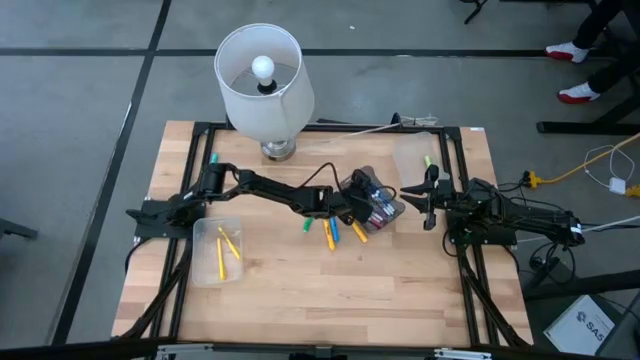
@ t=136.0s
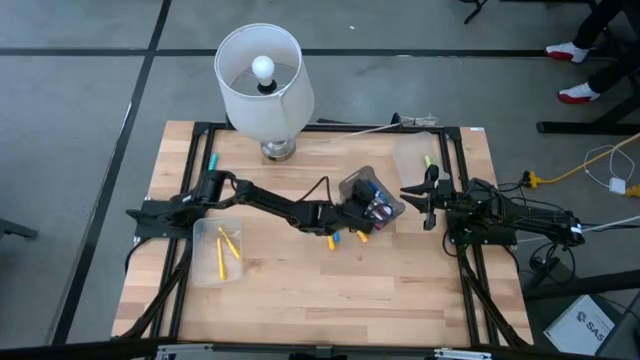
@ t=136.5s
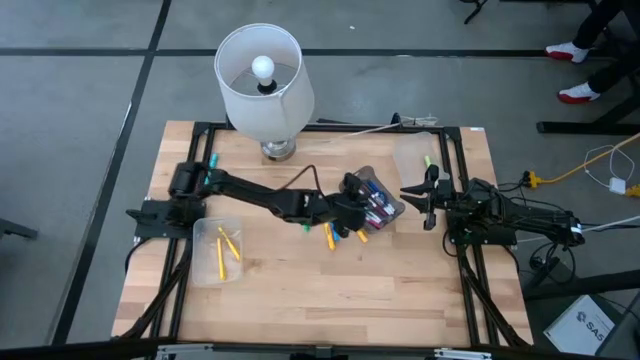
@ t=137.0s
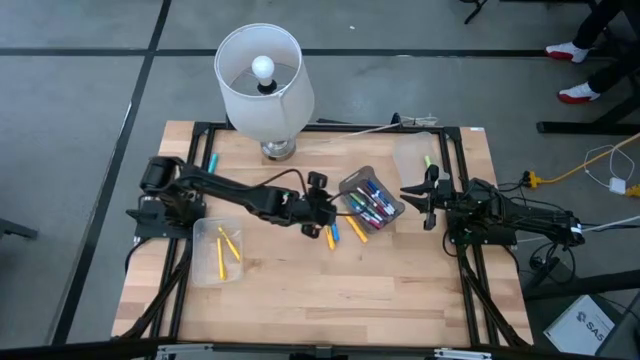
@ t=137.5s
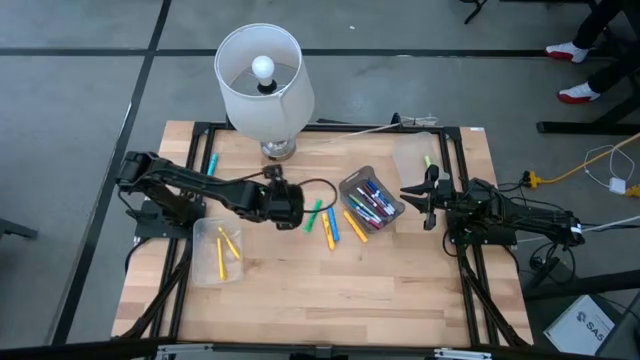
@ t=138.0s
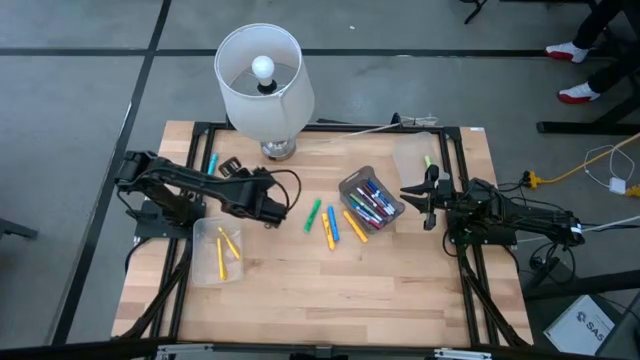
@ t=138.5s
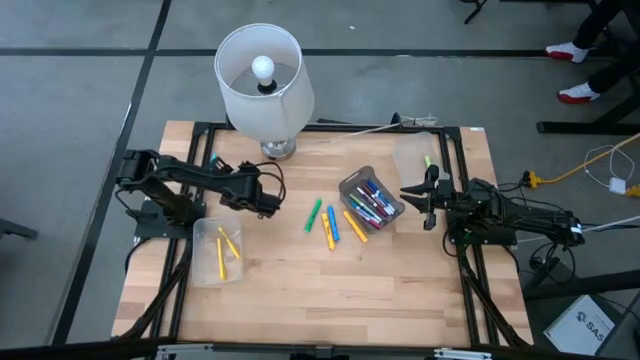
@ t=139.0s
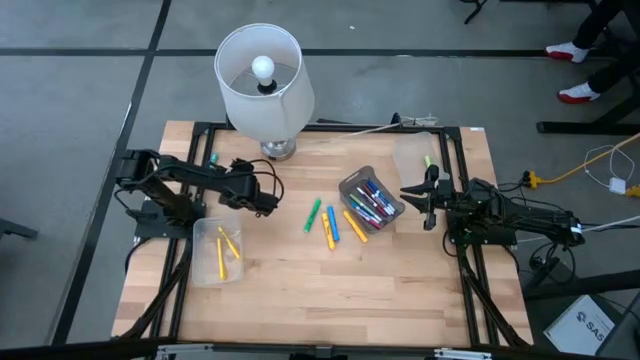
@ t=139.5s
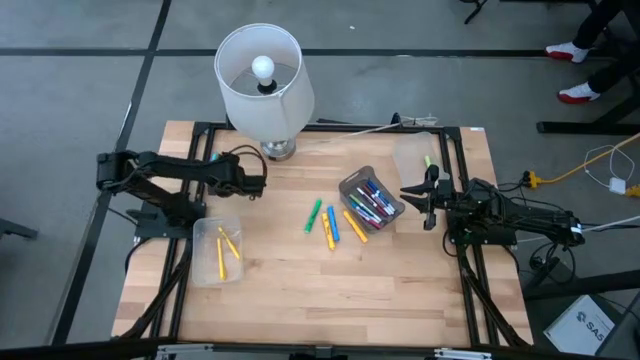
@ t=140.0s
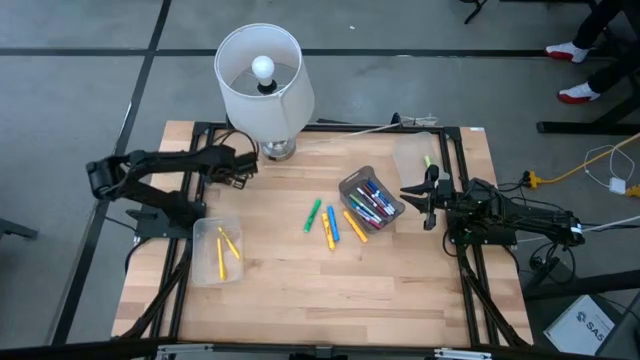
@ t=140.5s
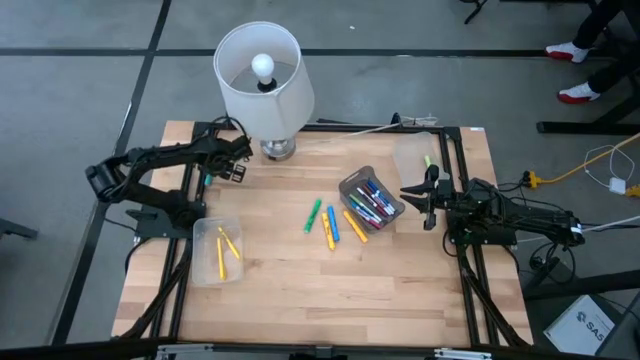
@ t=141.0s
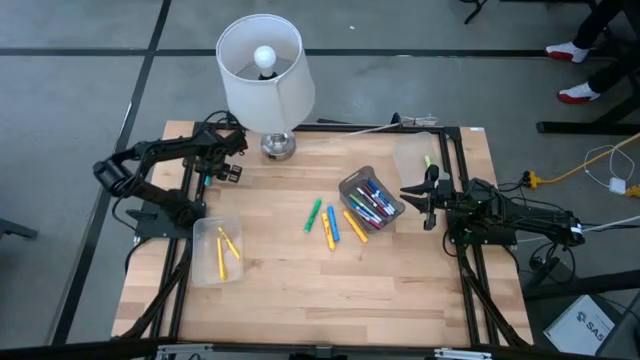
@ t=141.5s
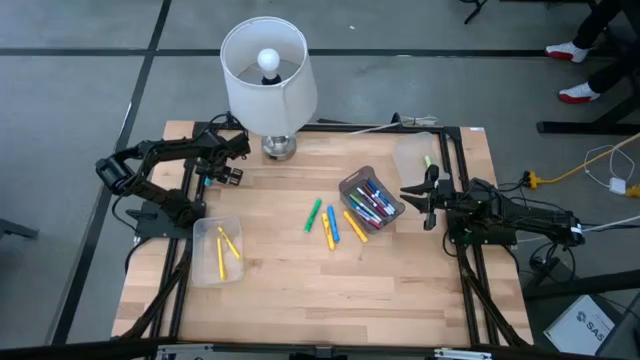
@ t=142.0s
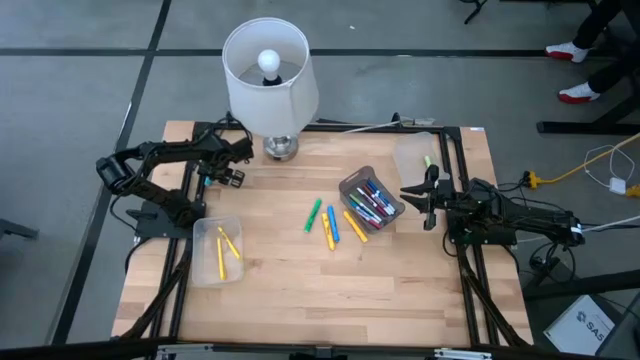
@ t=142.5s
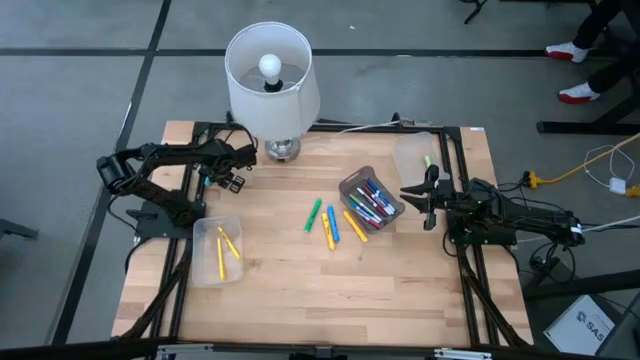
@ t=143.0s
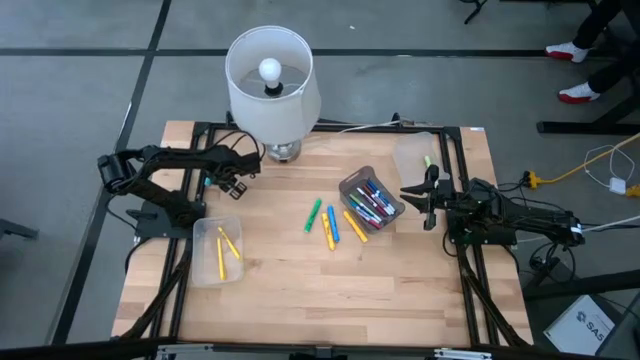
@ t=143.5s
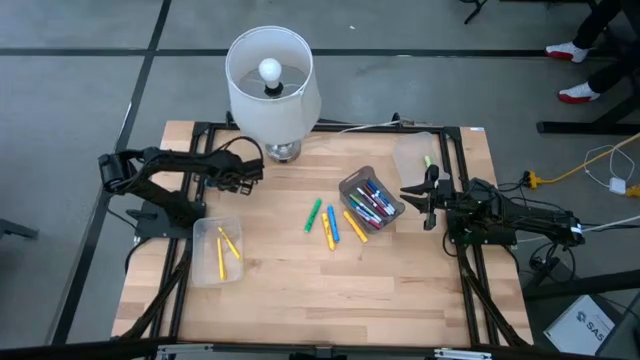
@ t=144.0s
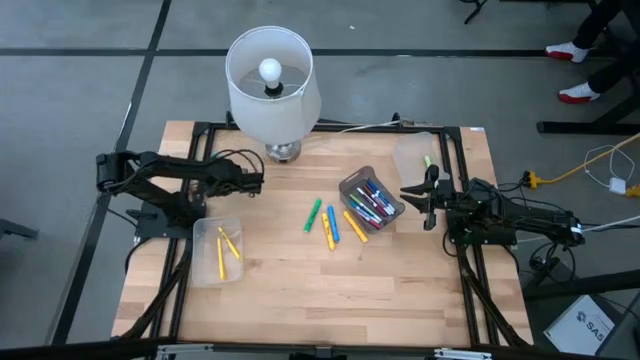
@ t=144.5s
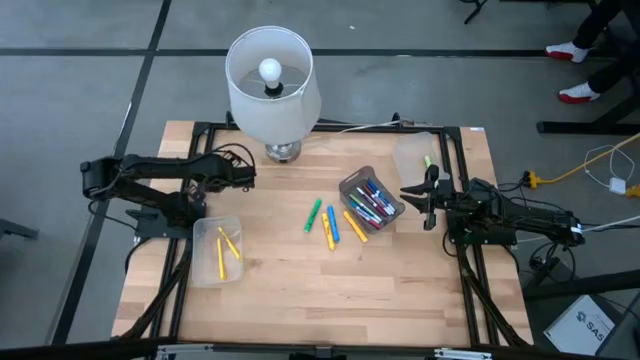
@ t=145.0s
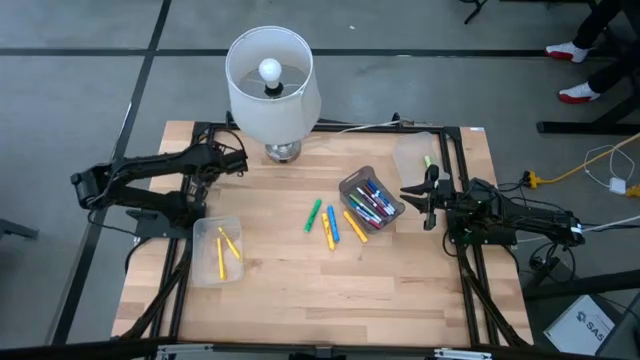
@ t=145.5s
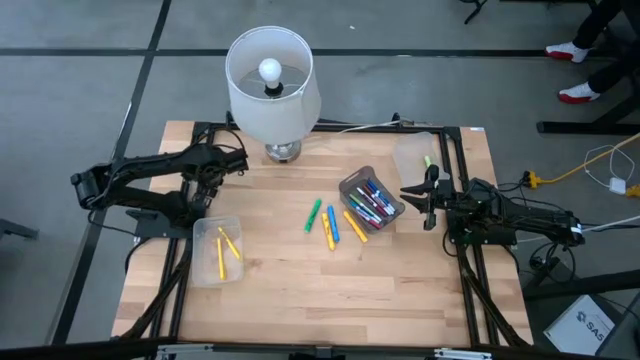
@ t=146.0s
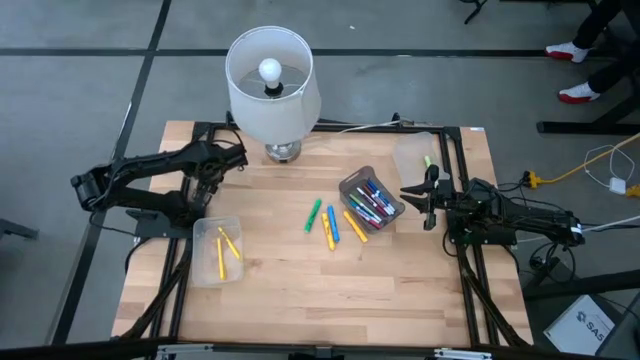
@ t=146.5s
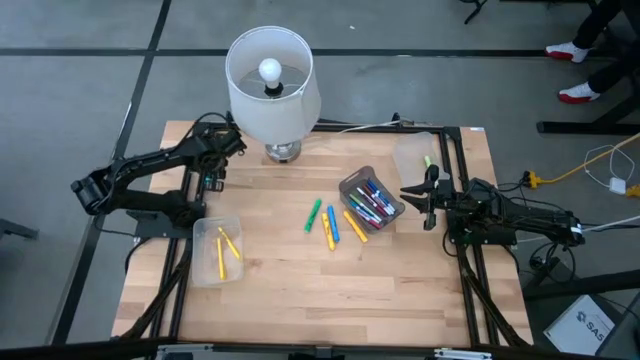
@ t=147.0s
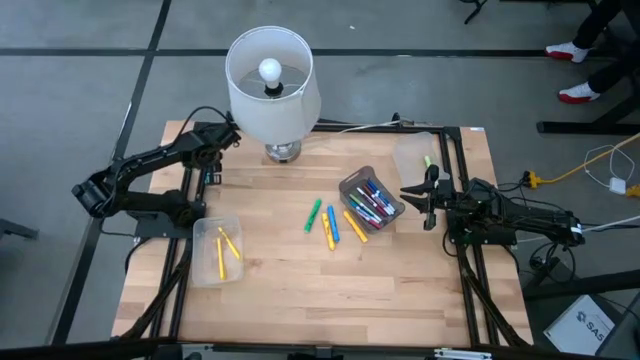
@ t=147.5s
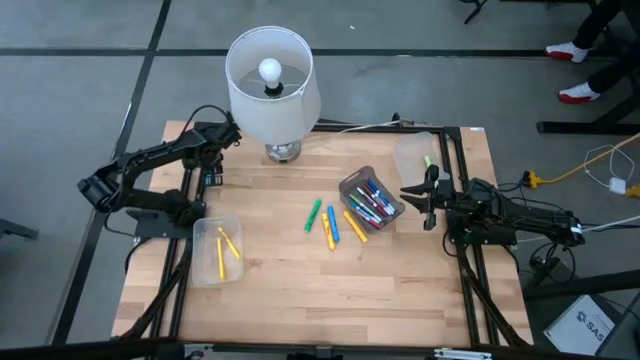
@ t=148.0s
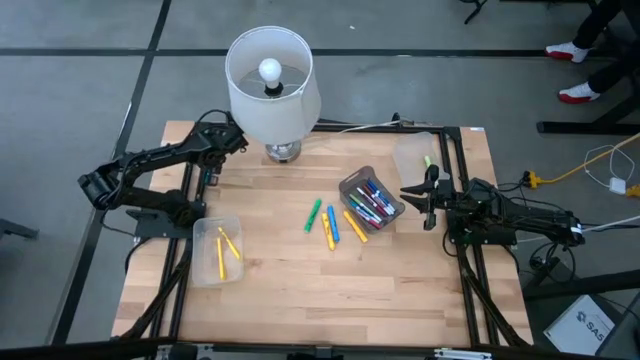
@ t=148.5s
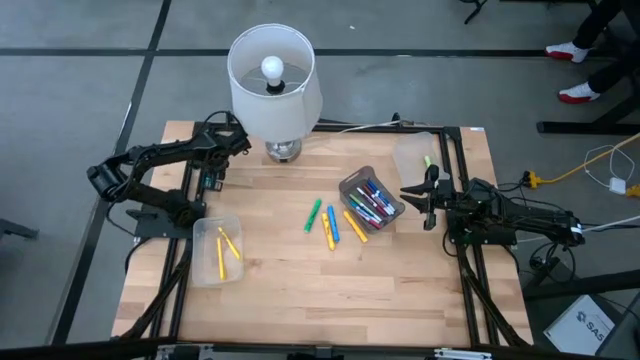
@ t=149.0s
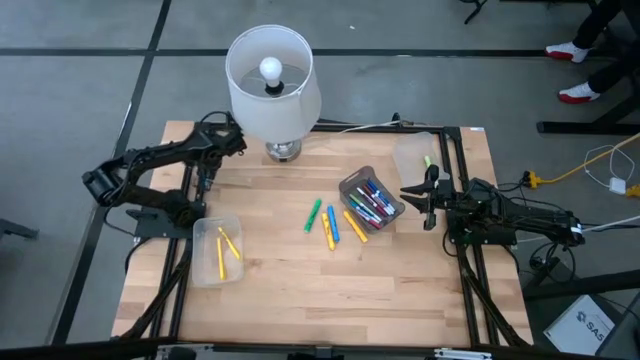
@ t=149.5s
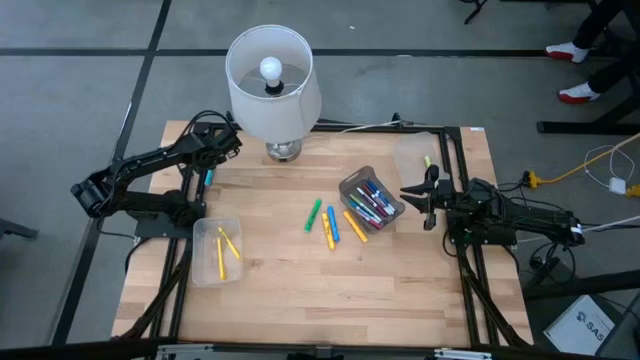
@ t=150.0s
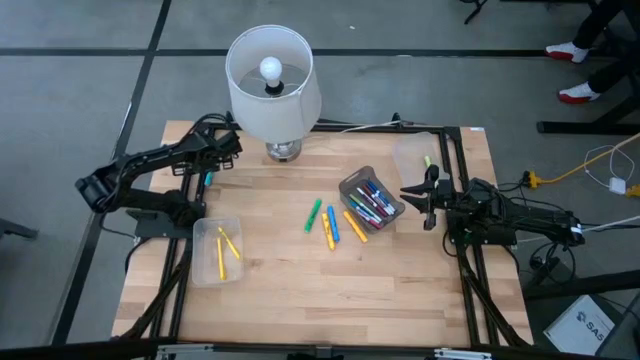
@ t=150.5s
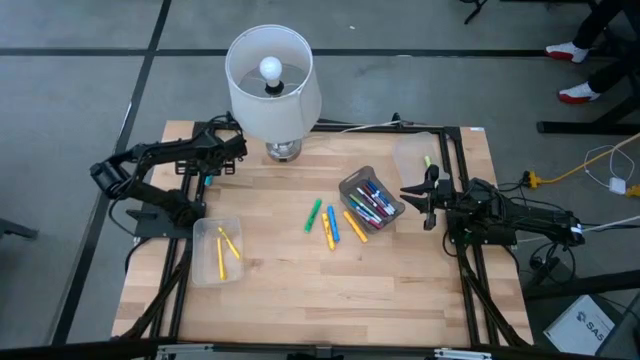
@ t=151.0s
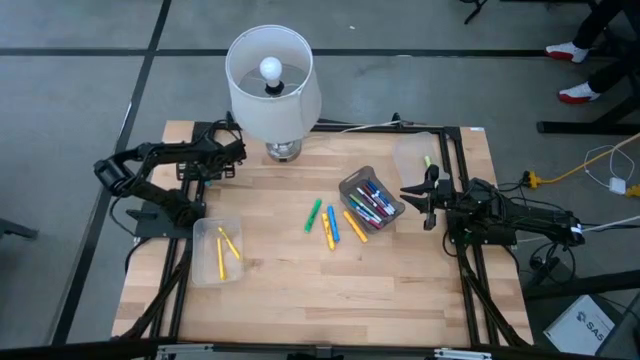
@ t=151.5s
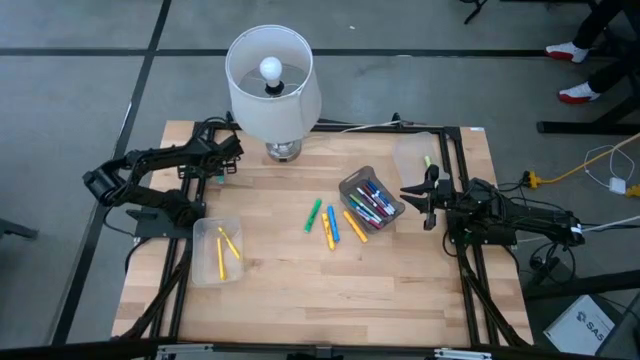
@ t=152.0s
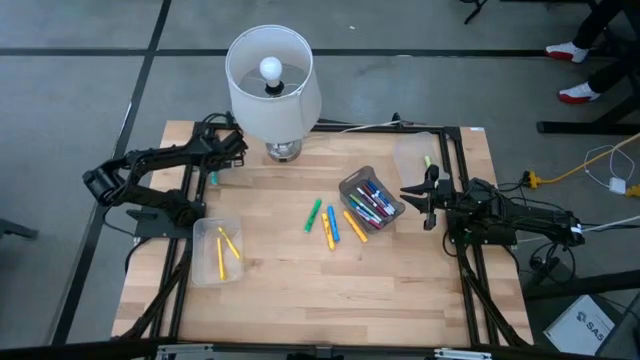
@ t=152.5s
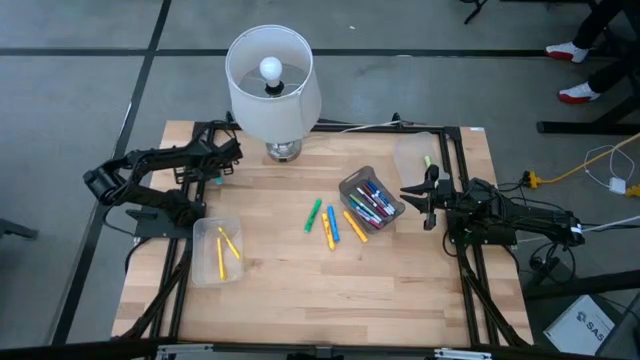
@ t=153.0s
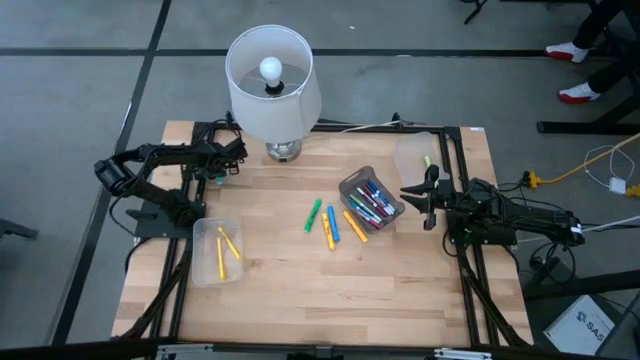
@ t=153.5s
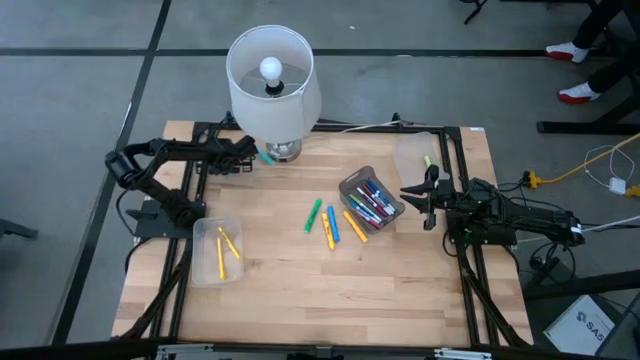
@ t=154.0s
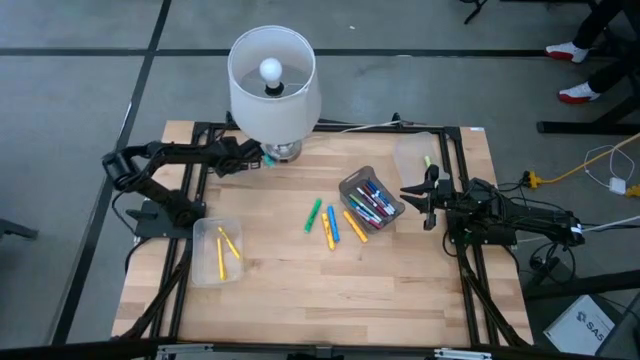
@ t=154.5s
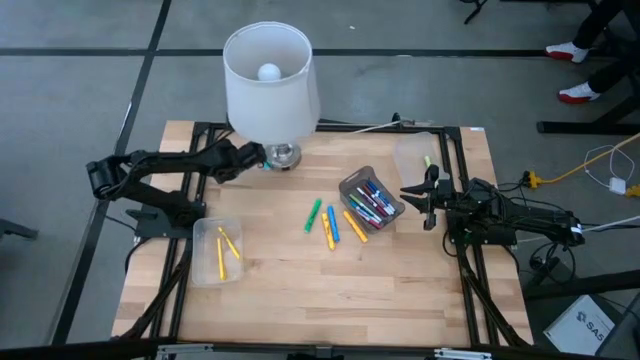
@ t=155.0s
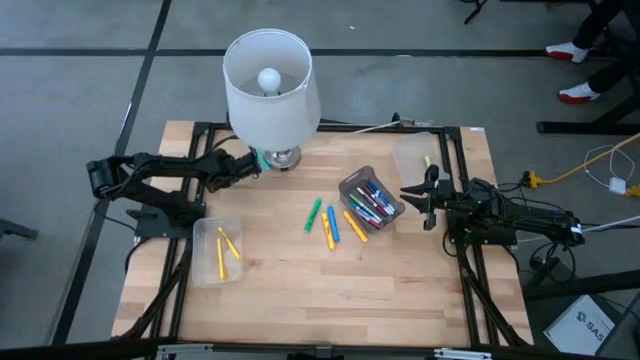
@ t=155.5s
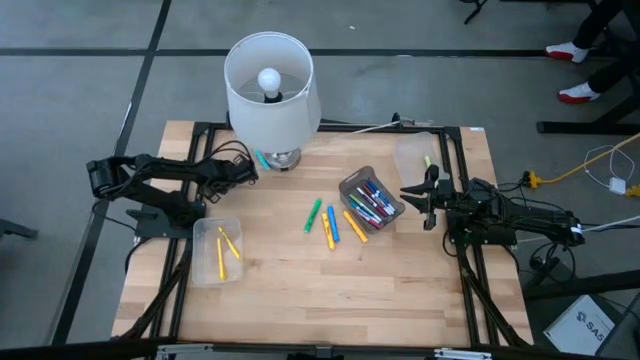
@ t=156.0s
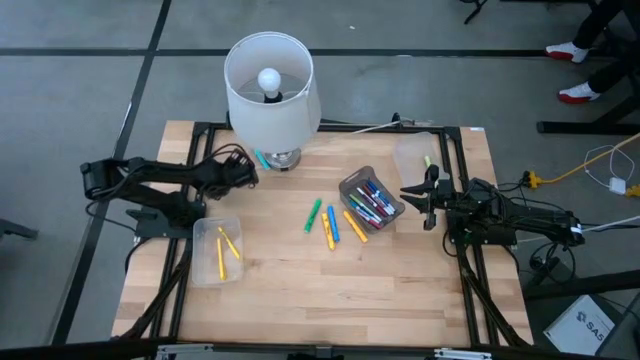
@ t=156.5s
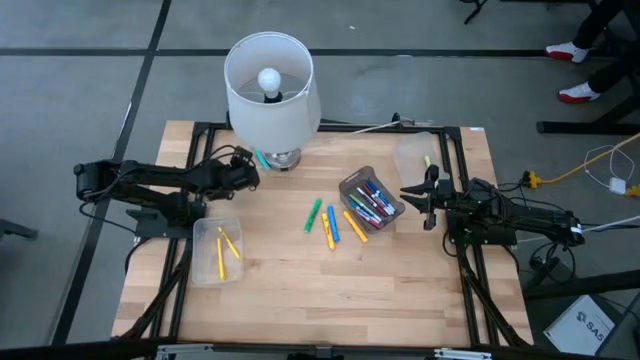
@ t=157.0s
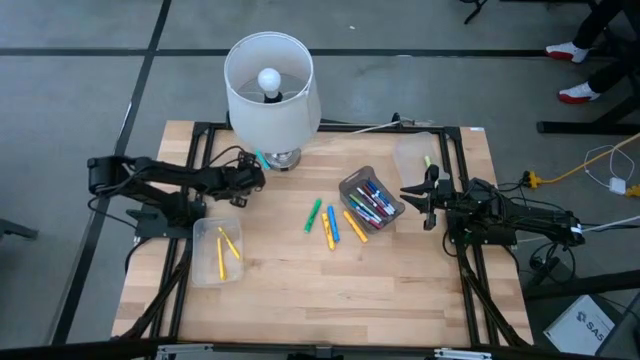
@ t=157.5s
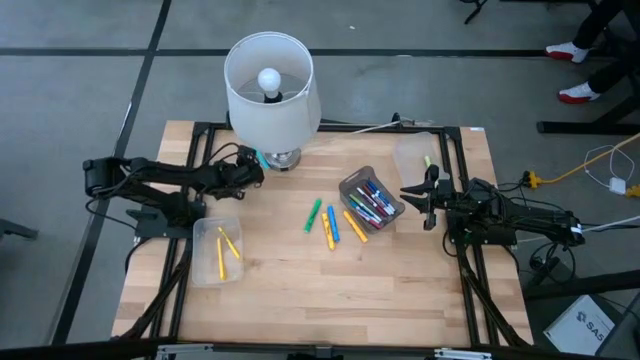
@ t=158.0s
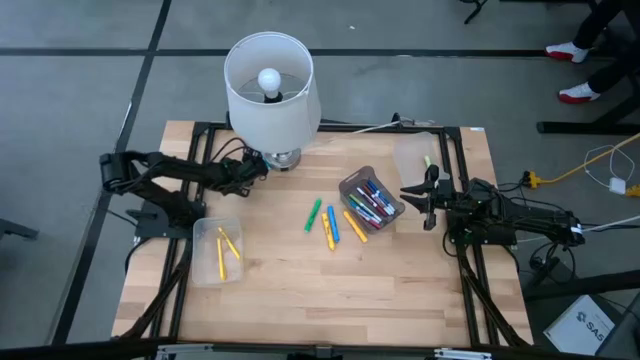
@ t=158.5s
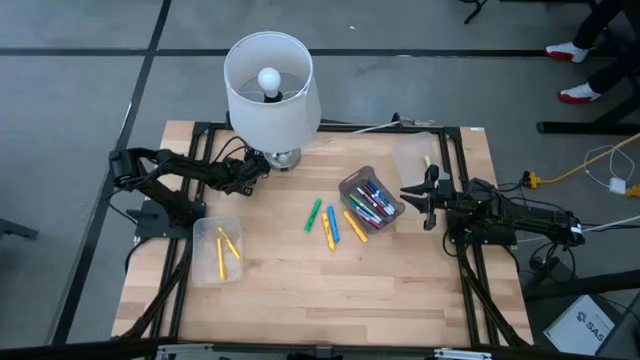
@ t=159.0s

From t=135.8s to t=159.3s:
Task: Pick & Place Markers
Put the yellow highlighter pen into the right transparent bin
